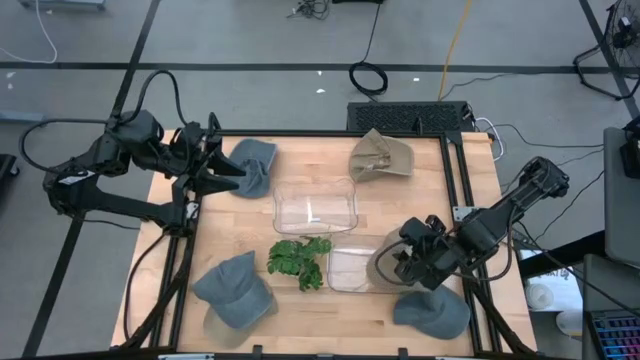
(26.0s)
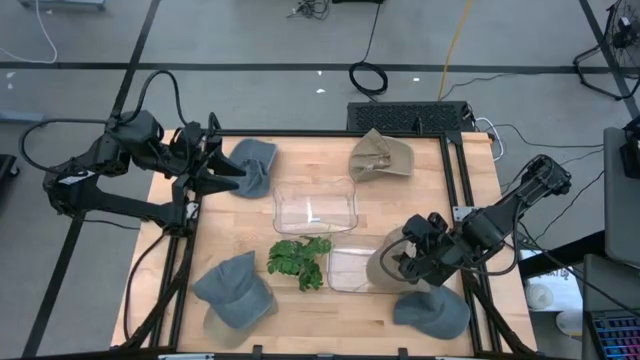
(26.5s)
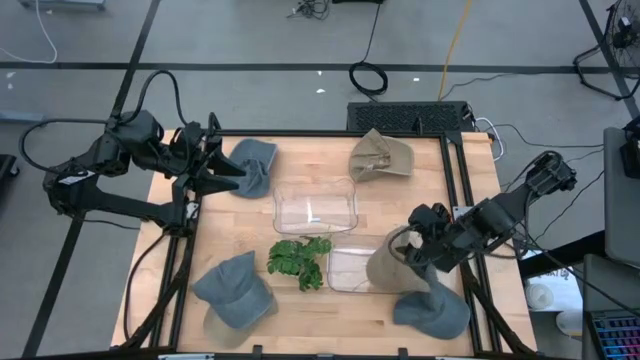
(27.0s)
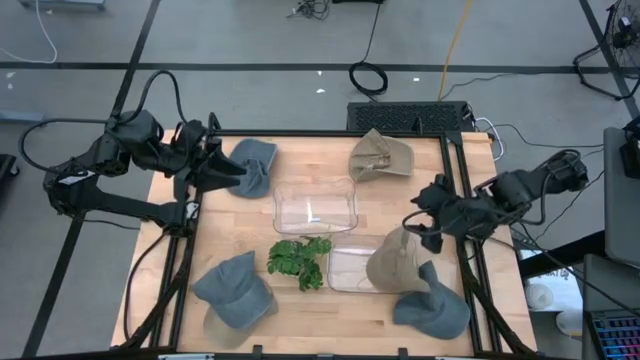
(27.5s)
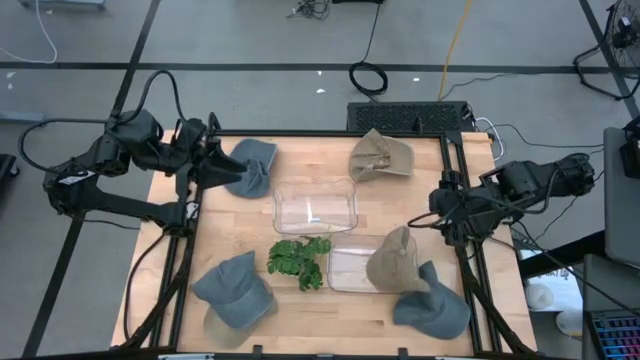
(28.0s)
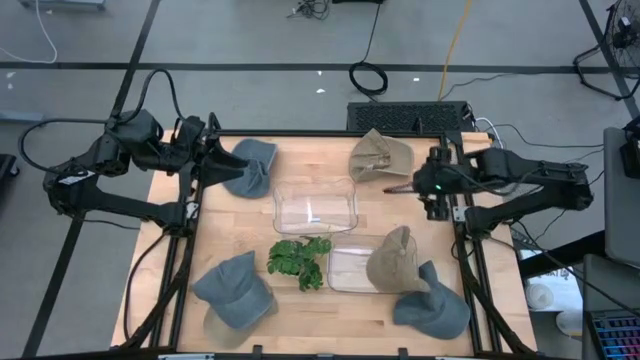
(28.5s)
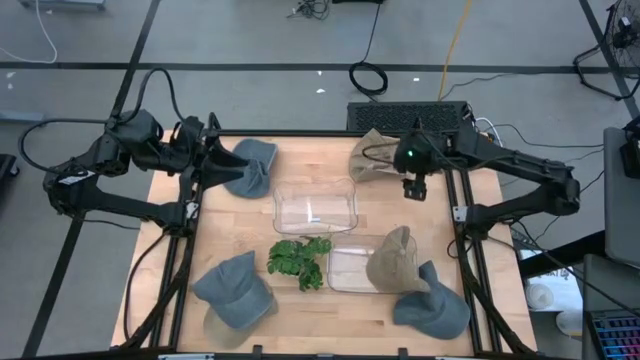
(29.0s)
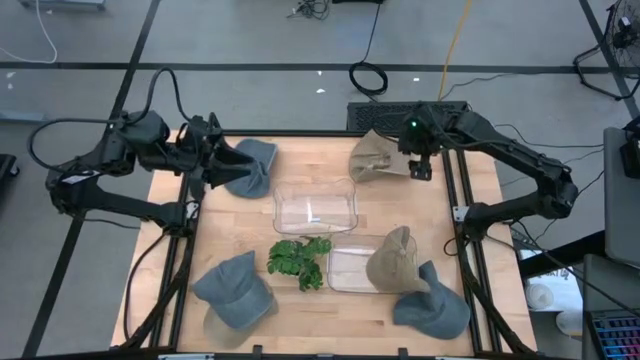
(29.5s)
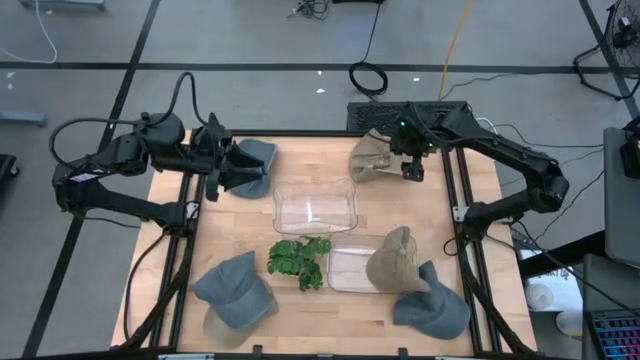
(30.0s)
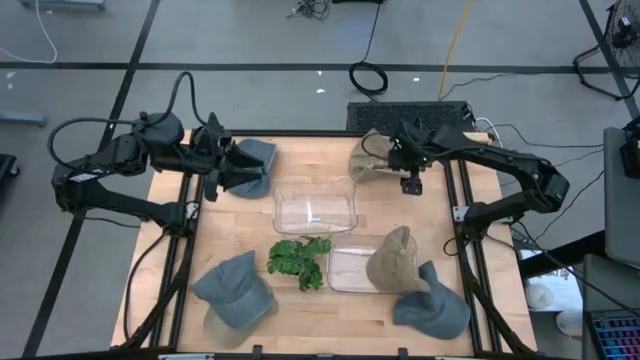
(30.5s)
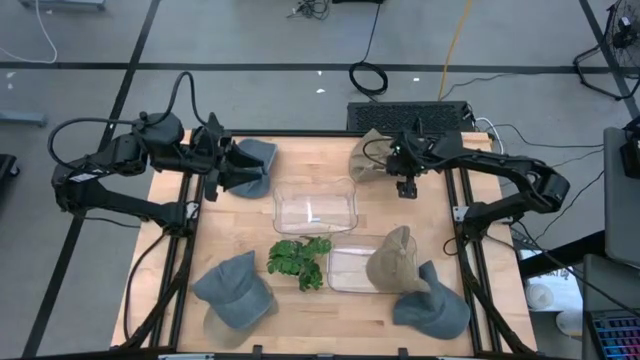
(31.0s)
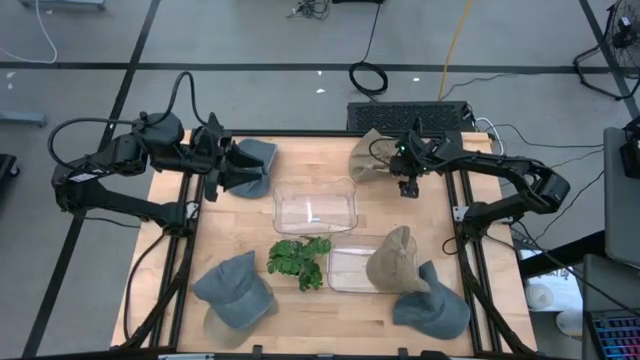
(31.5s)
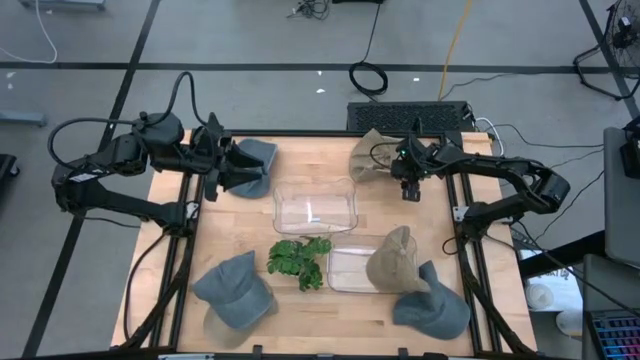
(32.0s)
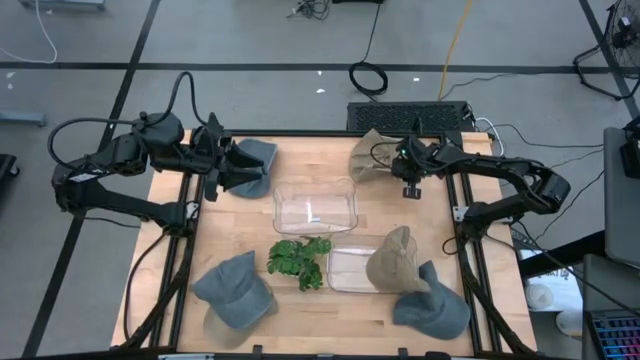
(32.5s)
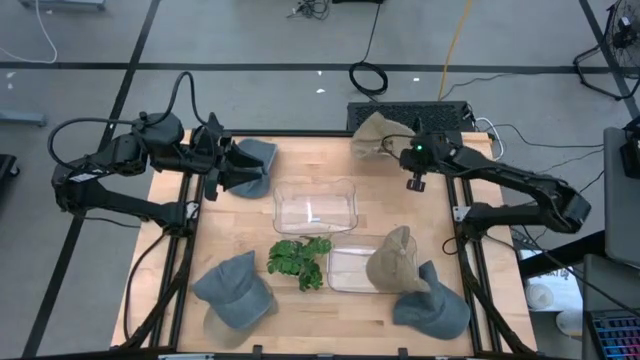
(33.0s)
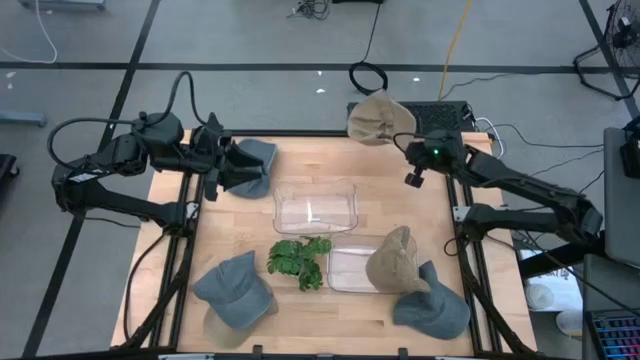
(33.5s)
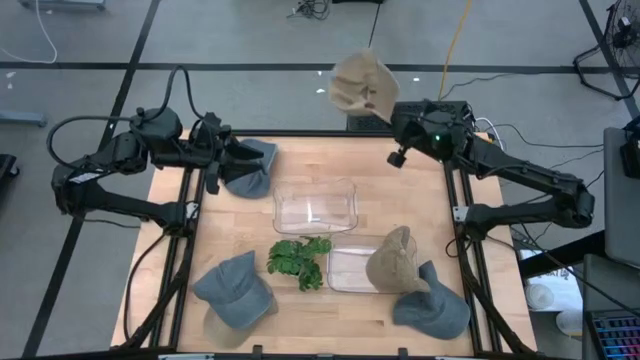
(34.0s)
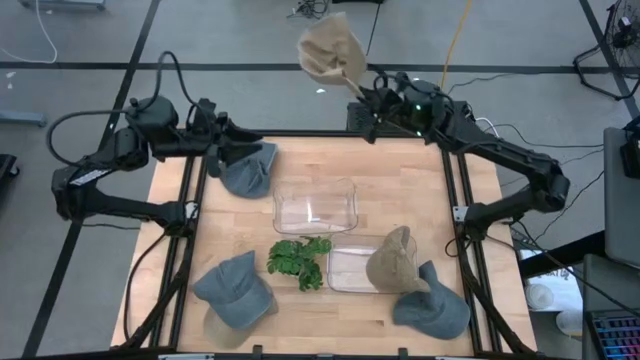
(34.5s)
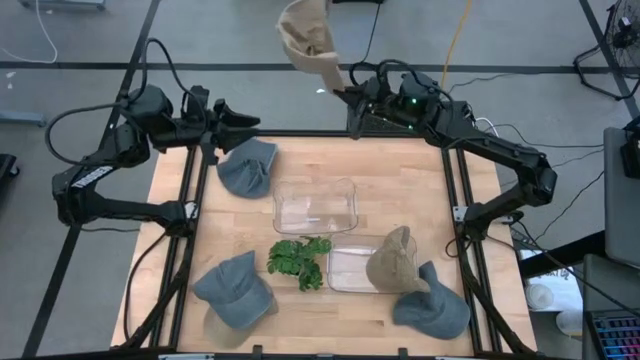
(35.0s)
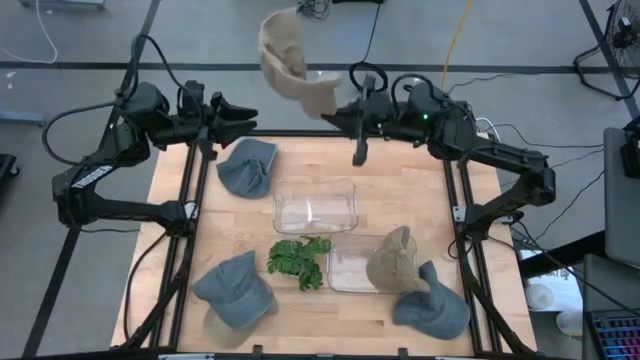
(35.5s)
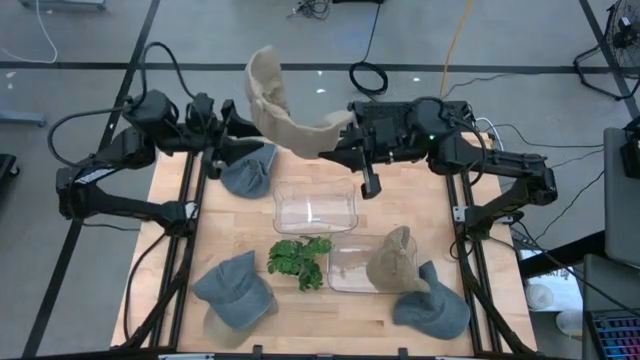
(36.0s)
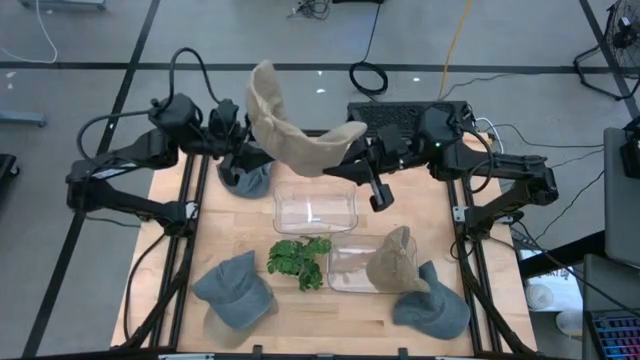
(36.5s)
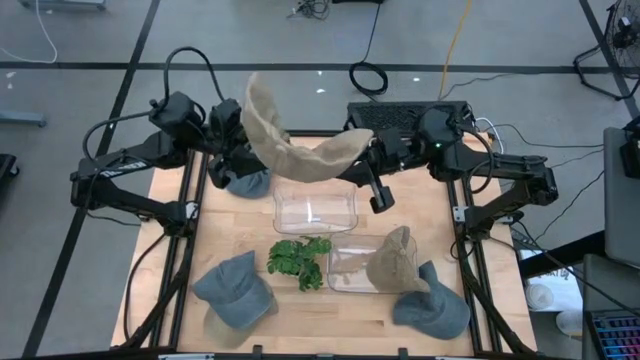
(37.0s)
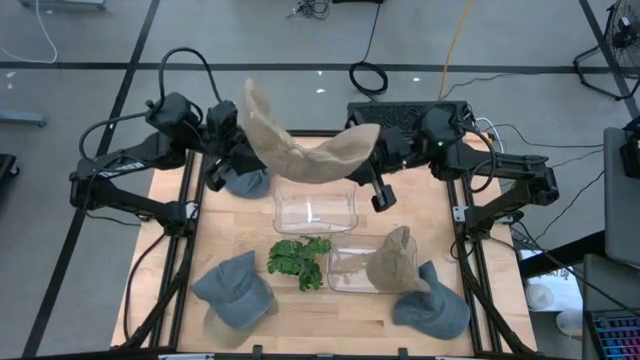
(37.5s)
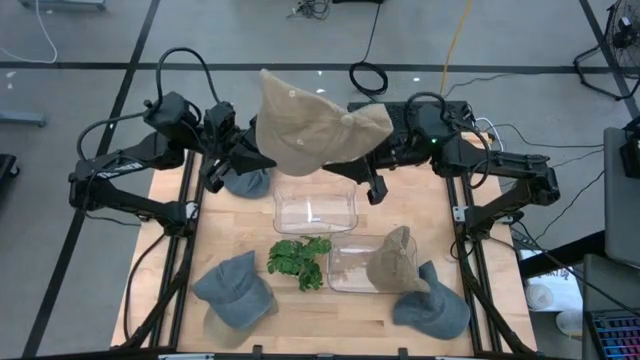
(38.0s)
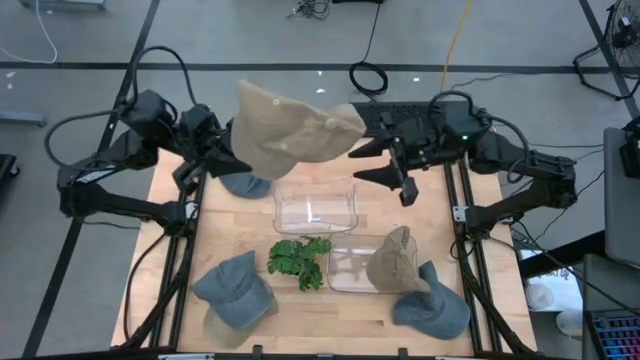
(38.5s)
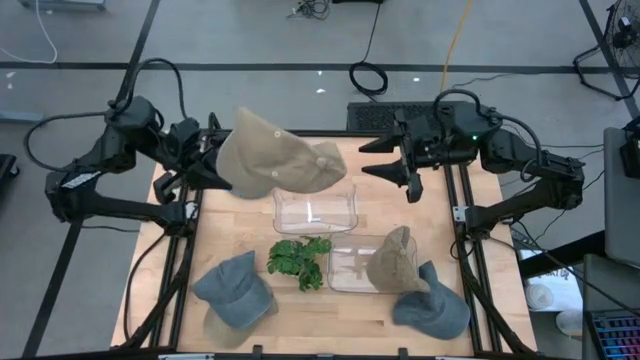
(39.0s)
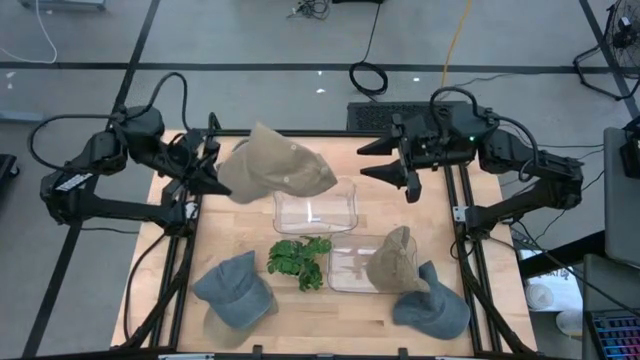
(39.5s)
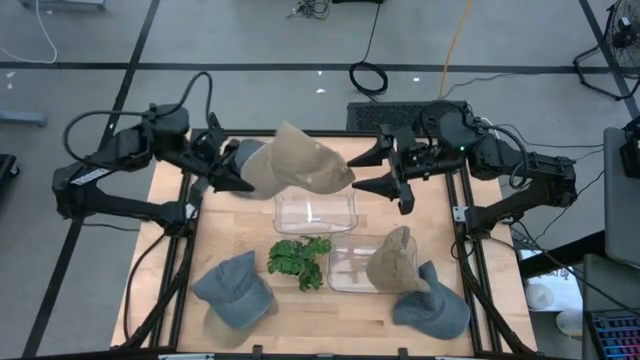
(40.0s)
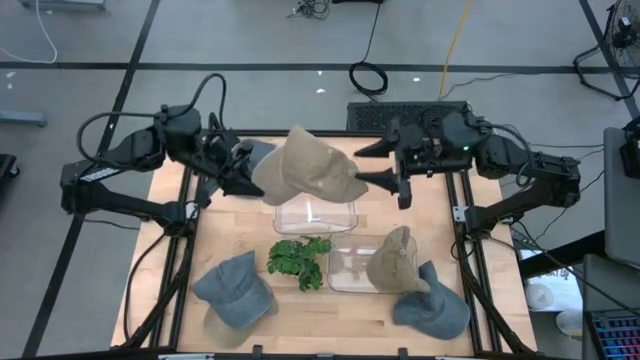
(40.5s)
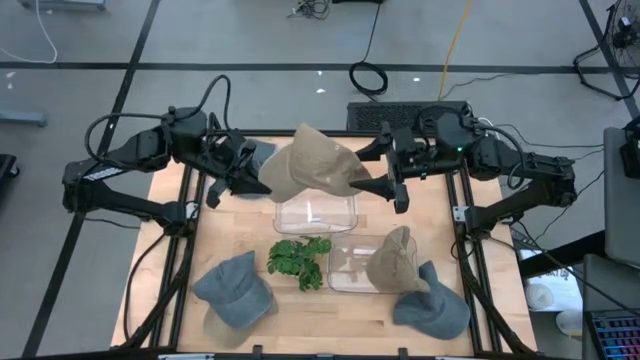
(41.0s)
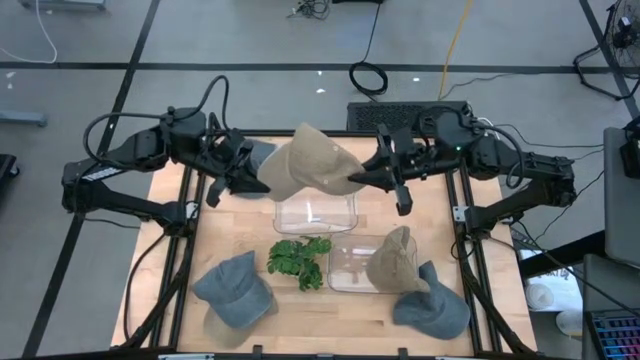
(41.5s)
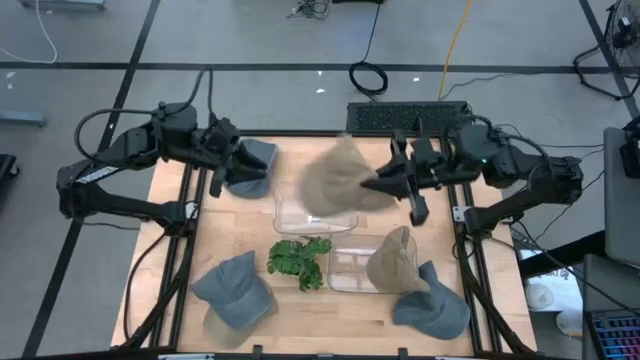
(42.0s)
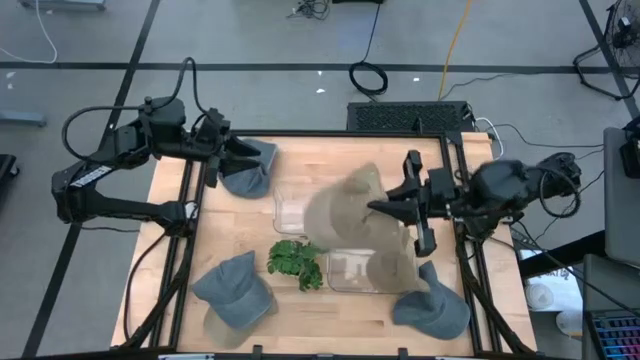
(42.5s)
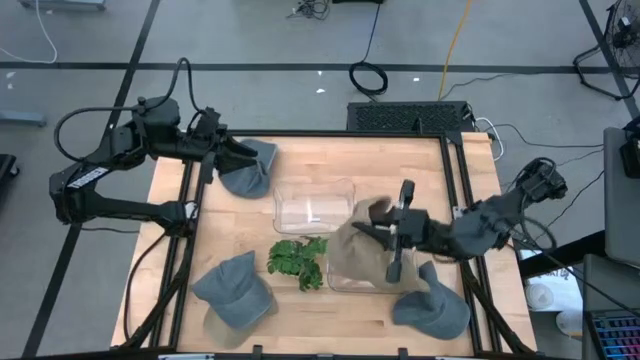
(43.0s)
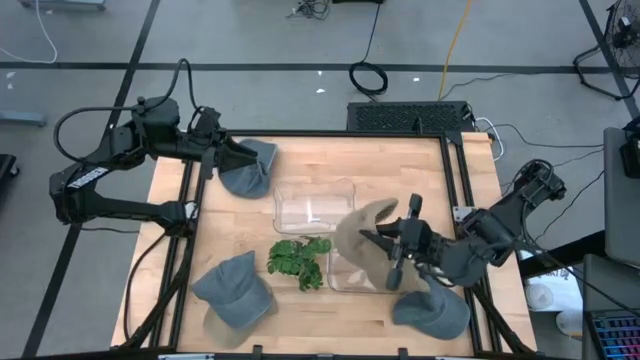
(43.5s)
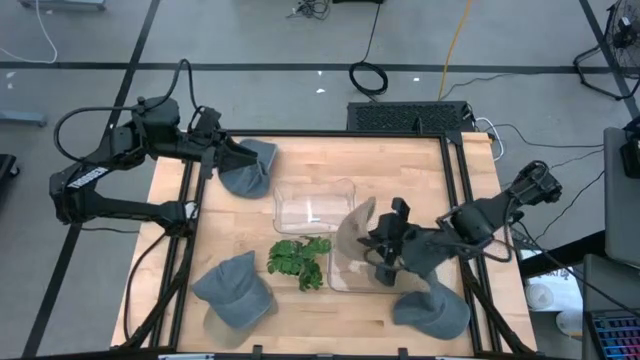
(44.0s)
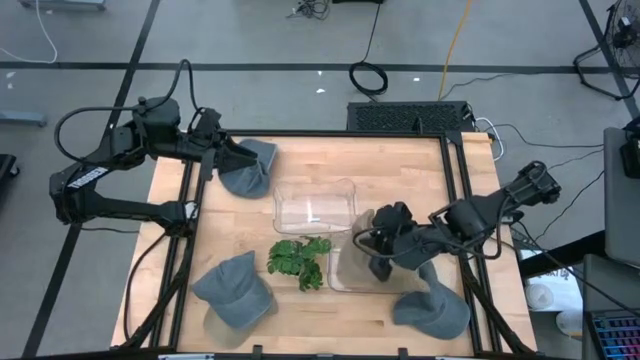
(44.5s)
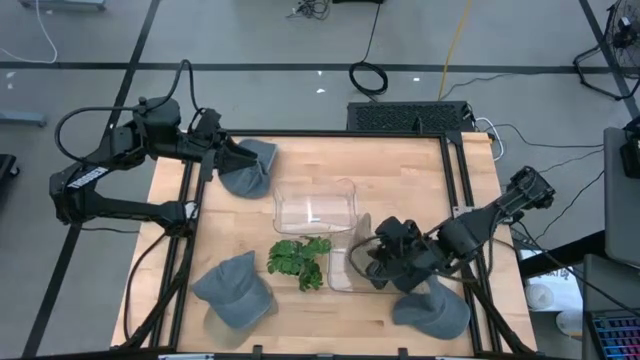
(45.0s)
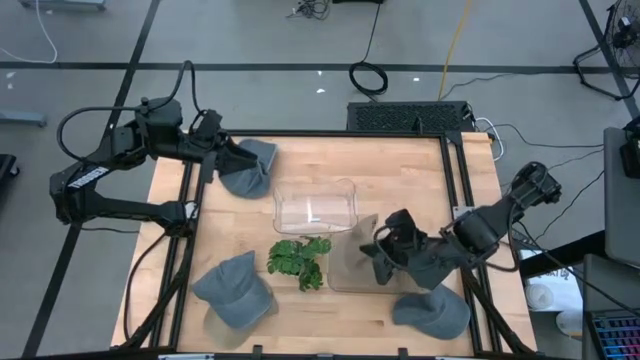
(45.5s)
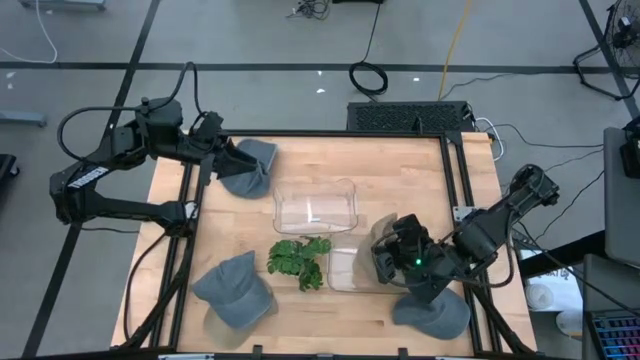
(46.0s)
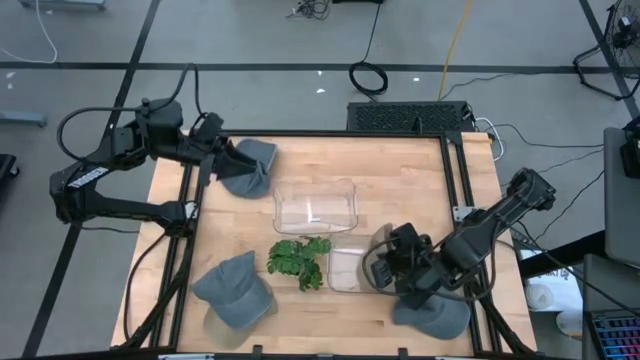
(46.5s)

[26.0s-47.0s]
Task: Pick & Place hat
Put the top brown cap into the bottom transparent bin
